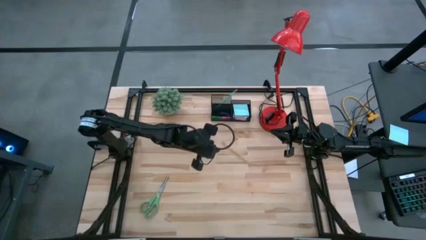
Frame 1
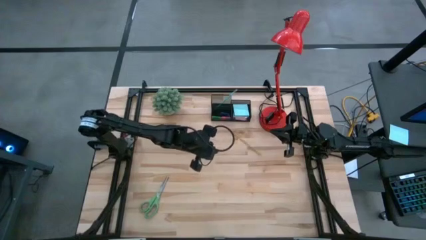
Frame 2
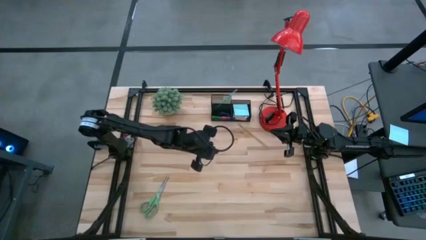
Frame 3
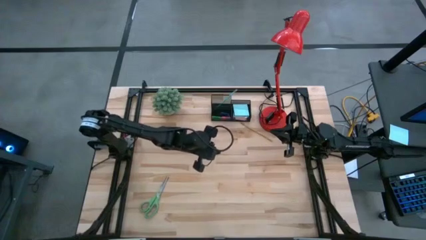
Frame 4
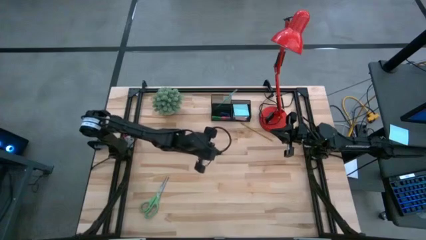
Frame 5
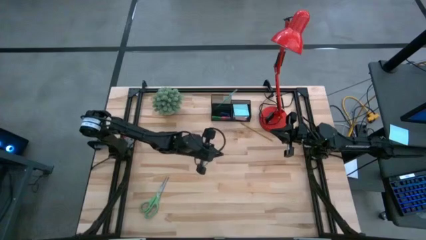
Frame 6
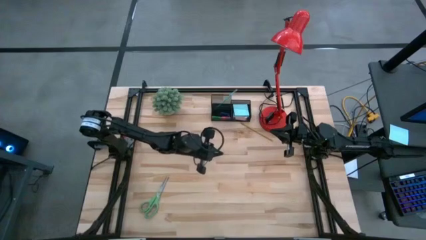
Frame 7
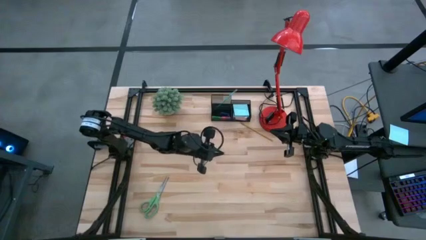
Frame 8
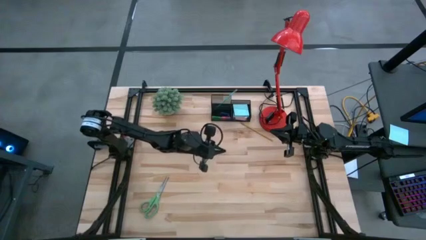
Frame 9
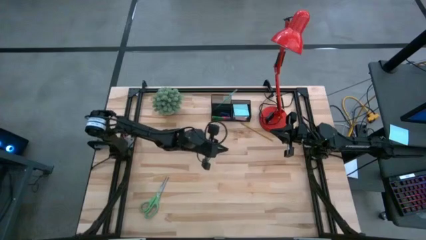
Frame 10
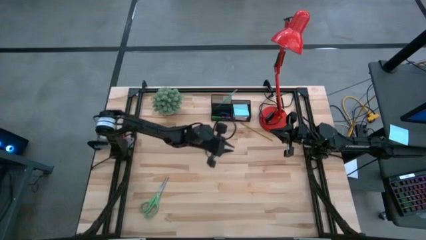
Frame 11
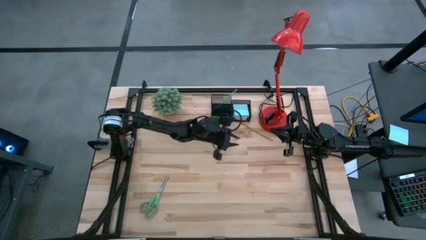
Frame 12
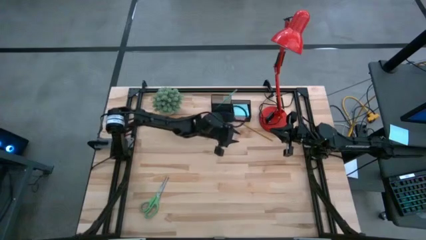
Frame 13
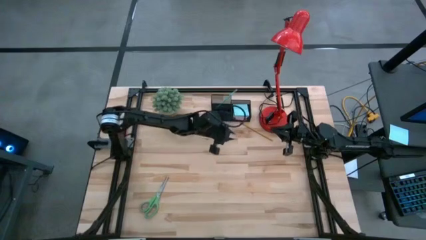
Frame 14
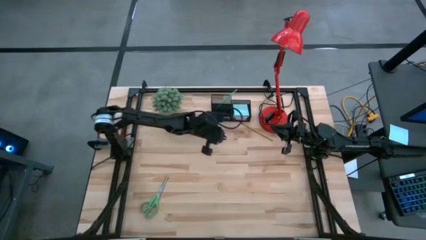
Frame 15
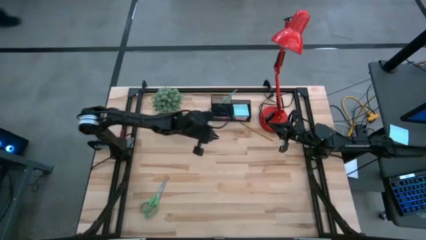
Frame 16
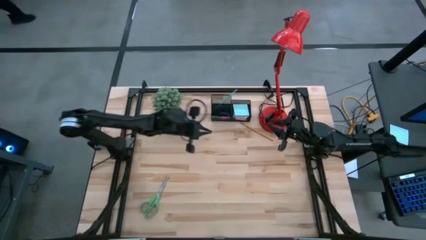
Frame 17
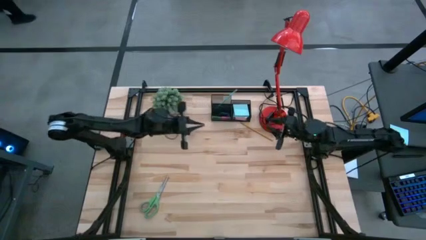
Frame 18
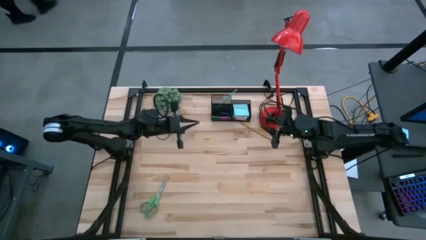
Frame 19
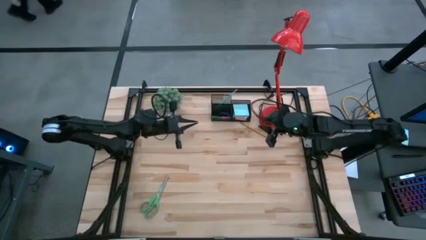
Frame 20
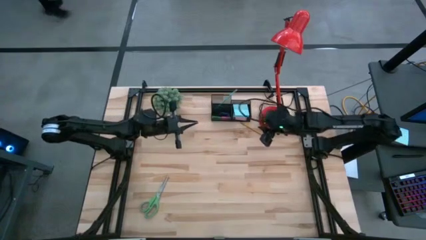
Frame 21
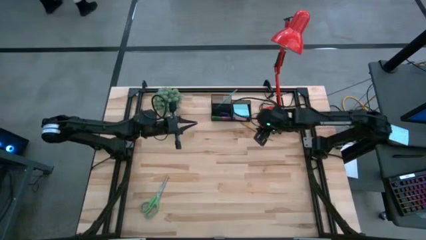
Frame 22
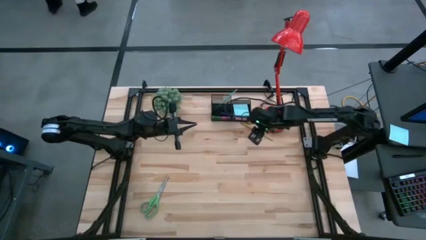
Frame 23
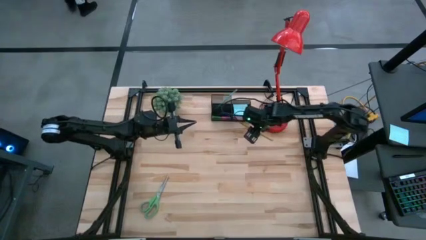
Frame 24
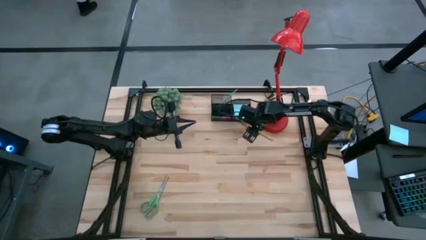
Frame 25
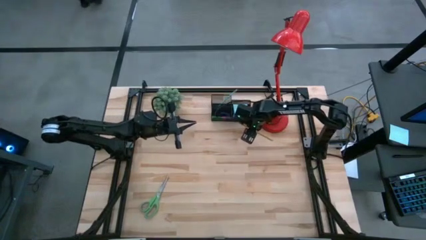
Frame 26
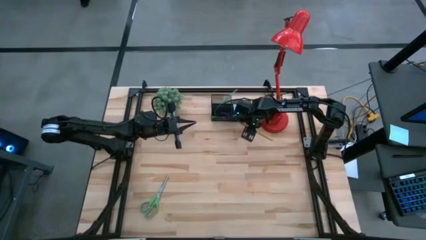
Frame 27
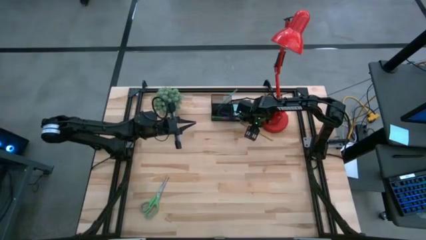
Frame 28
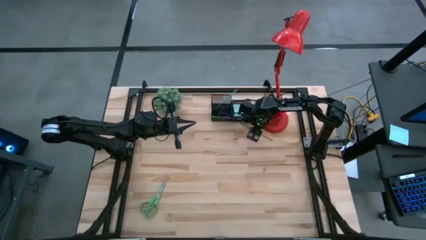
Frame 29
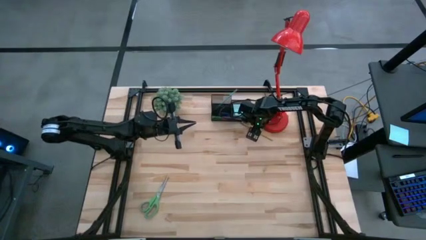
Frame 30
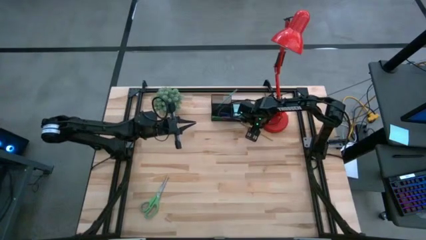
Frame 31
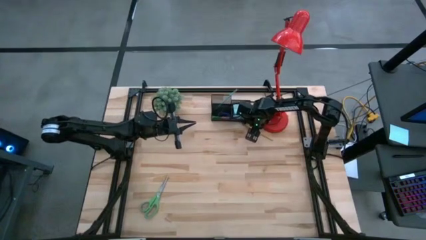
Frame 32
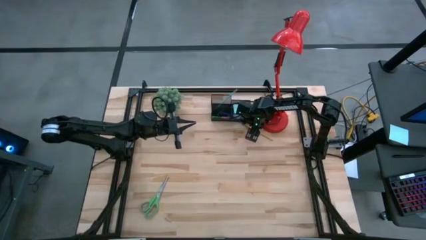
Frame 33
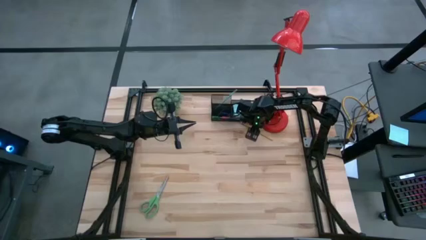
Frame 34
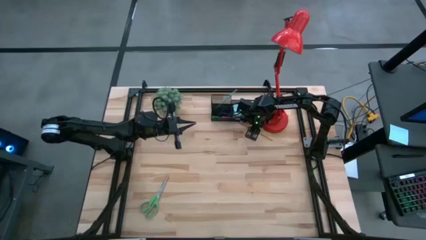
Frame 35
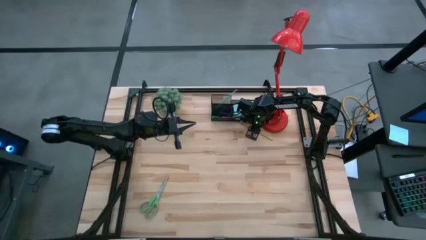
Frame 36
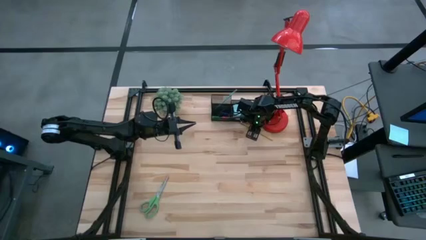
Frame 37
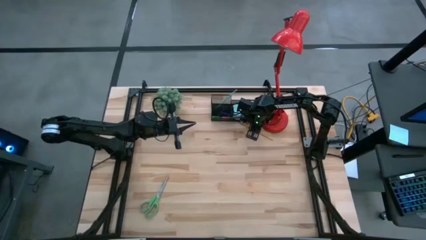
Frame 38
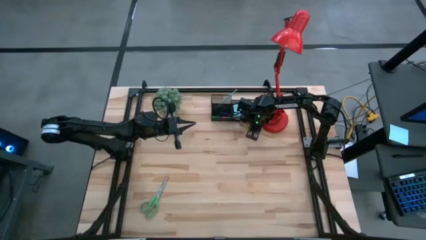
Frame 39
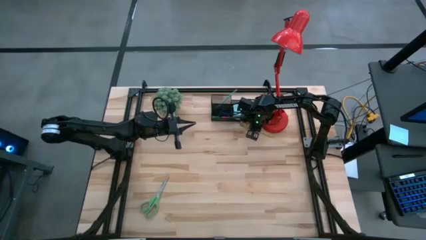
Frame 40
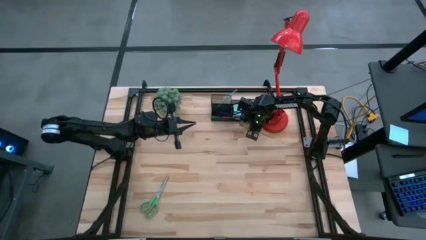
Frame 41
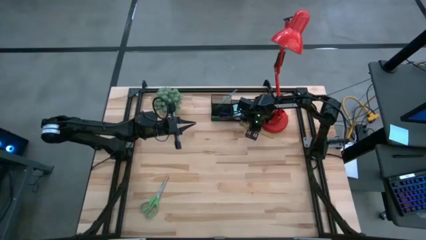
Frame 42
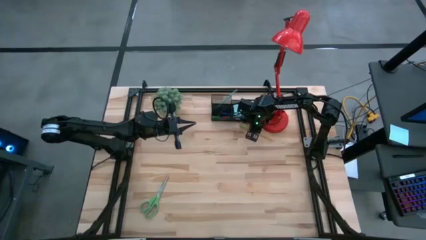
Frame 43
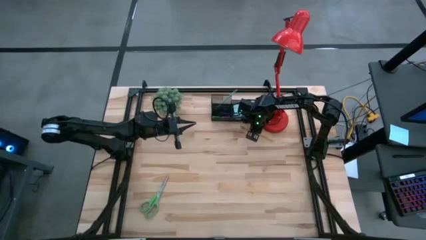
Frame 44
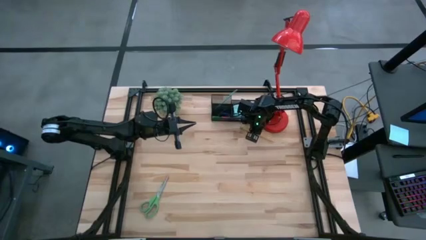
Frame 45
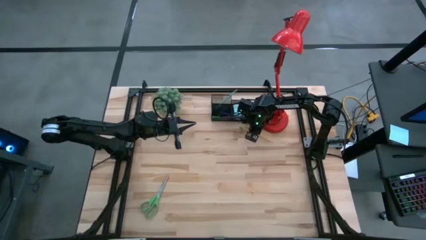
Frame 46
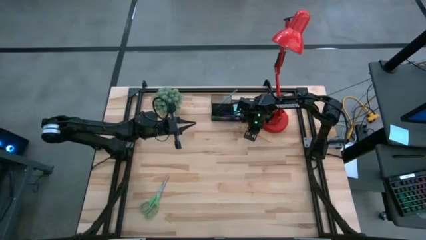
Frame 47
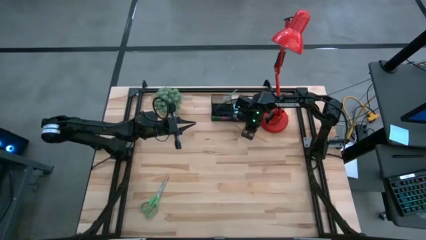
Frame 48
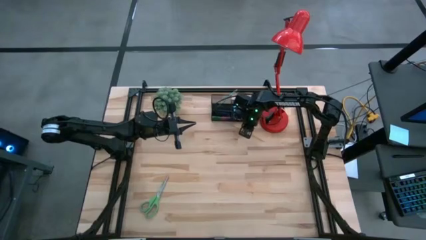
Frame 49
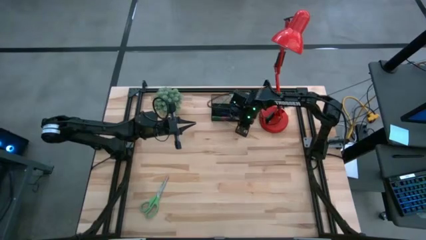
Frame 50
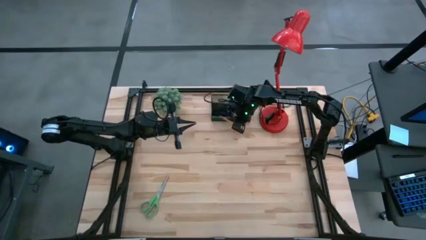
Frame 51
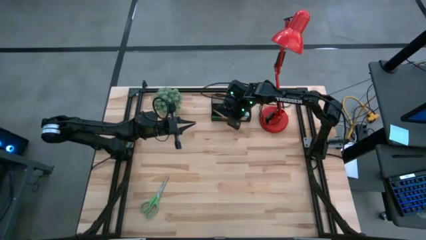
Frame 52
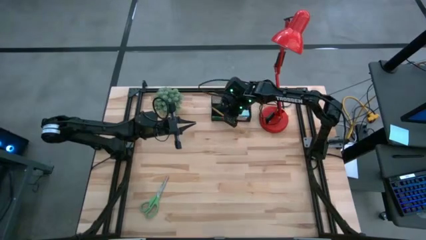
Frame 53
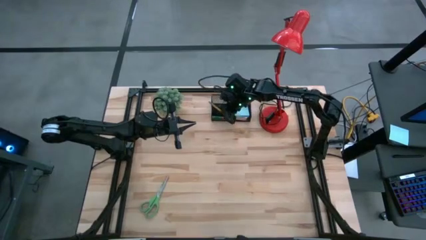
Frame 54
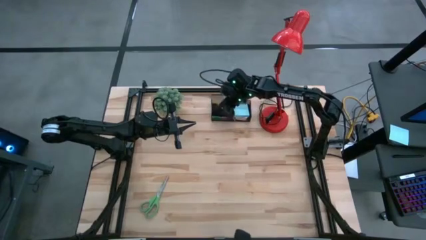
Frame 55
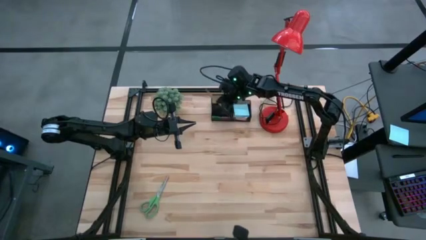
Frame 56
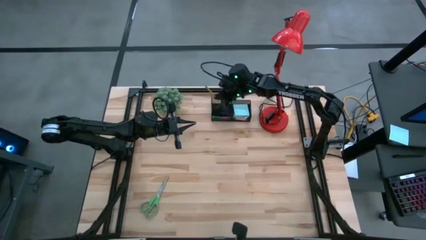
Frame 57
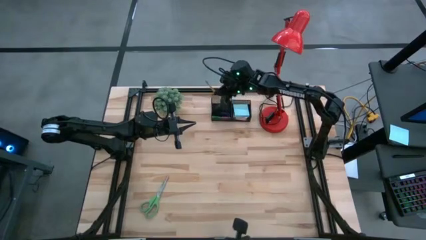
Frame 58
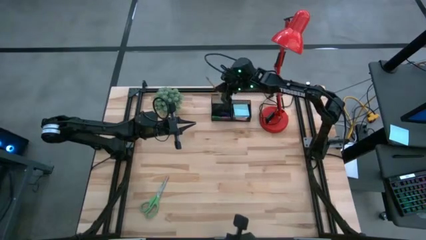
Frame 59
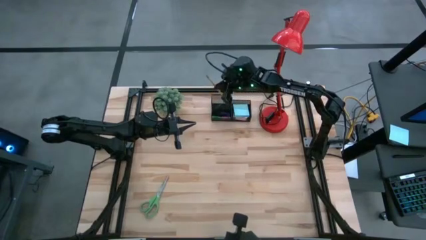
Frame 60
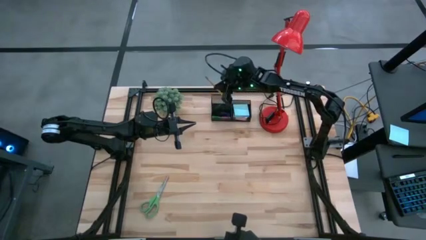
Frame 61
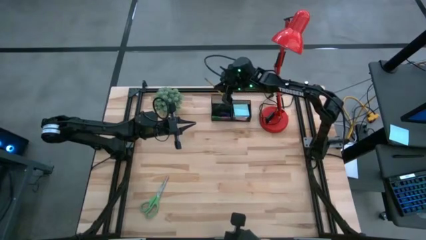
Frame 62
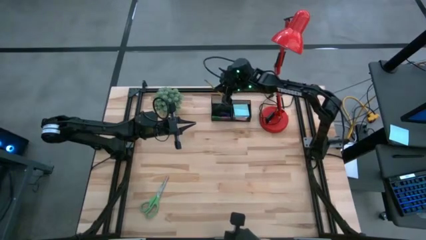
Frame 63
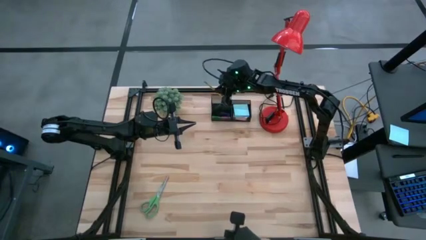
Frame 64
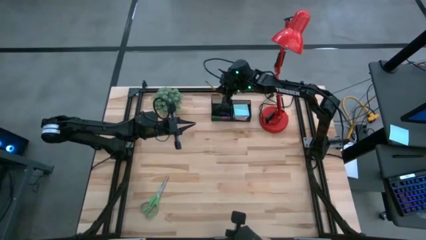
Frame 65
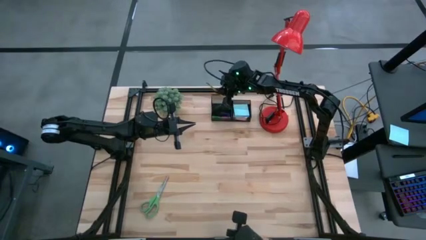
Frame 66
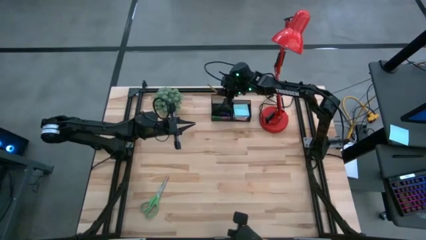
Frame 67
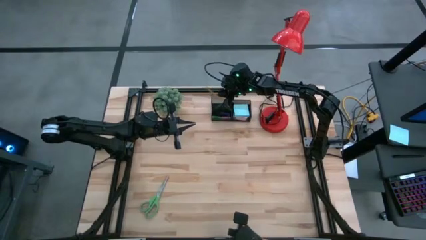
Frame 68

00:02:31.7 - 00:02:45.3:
Task: Pick and place office supplies into organizer
Put the yellow pencil into the desk organizer

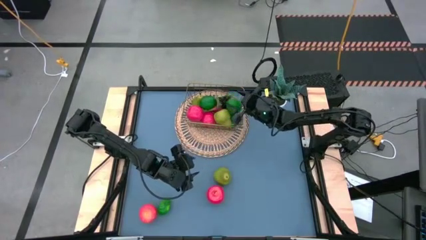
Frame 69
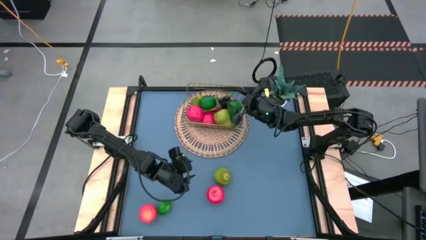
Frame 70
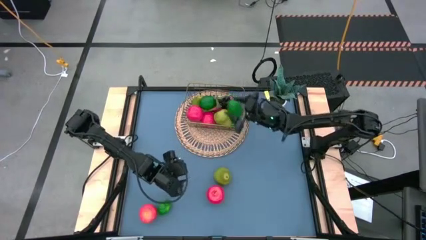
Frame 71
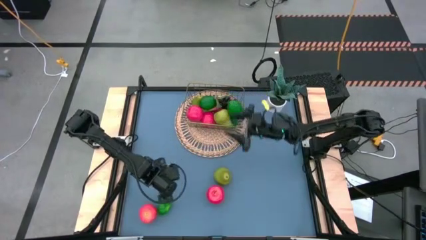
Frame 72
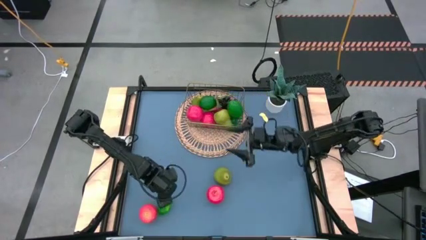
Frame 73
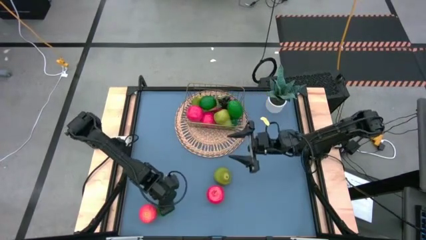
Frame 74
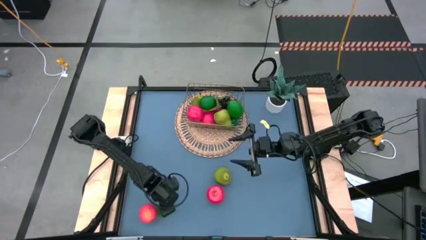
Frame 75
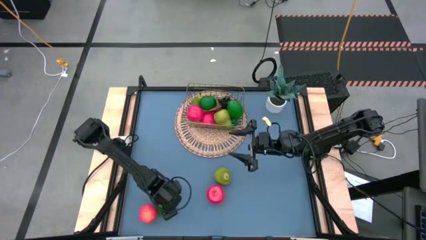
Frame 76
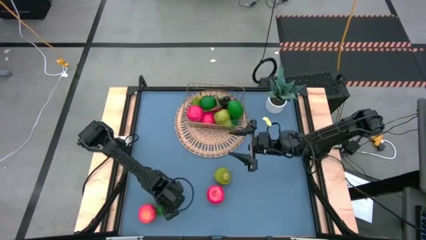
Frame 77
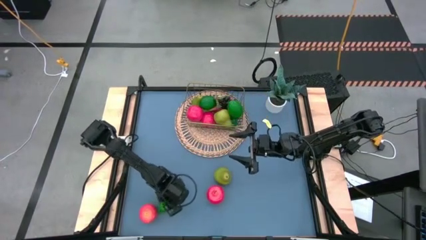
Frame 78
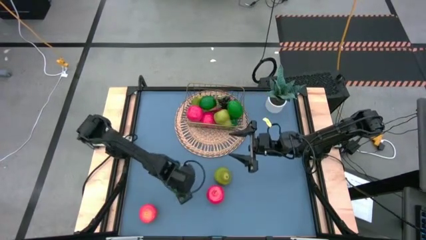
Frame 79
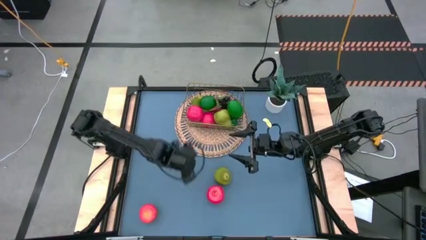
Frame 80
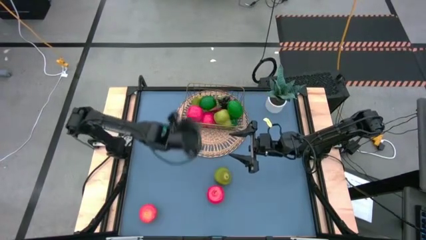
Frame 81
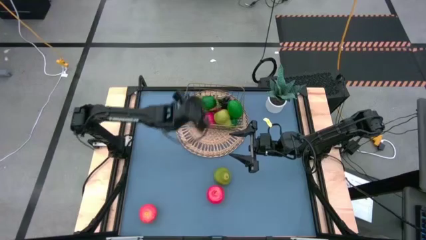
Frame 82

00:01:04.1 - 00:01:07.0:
Task: Build produce basket
Put the green lime into the gold wire basket
